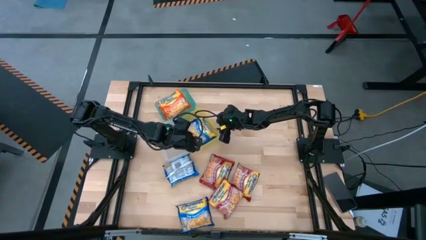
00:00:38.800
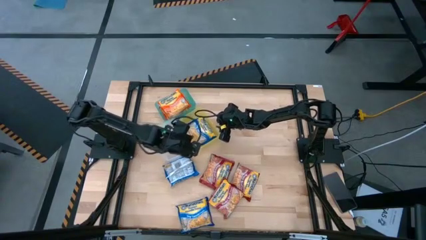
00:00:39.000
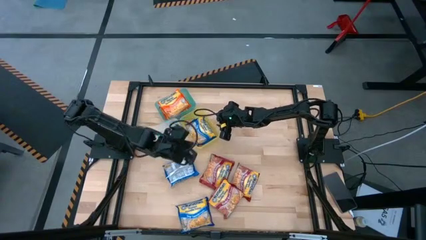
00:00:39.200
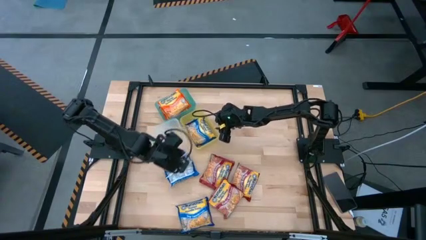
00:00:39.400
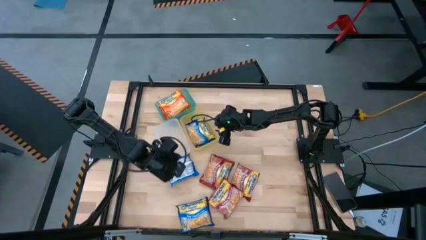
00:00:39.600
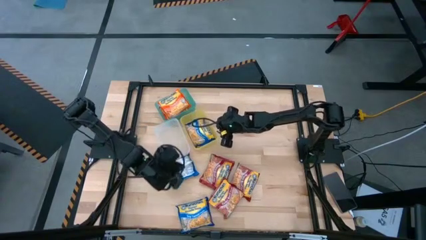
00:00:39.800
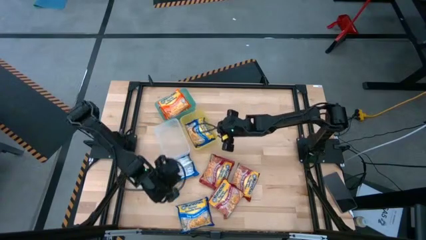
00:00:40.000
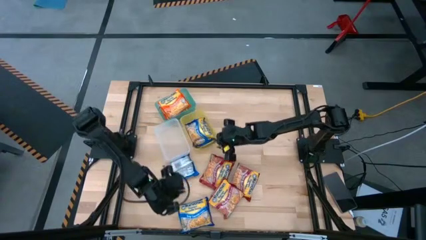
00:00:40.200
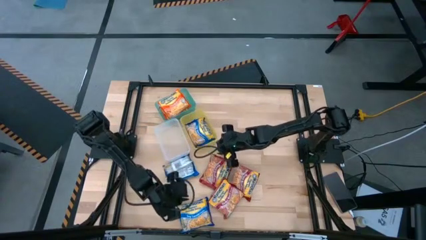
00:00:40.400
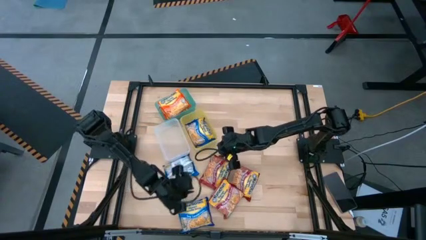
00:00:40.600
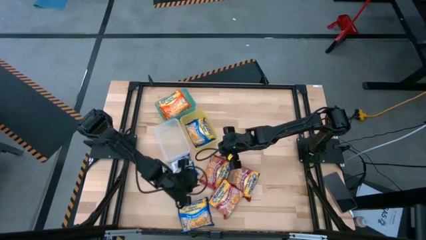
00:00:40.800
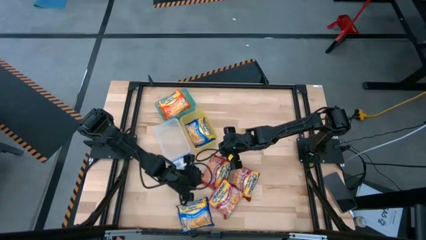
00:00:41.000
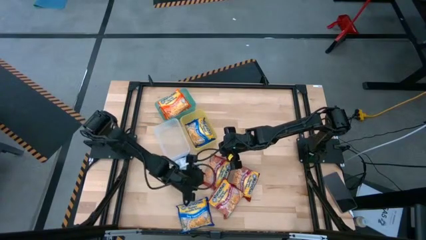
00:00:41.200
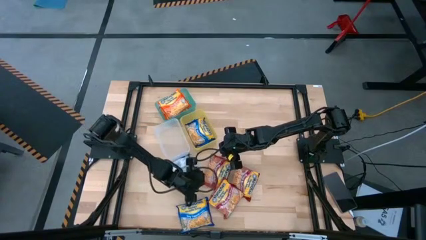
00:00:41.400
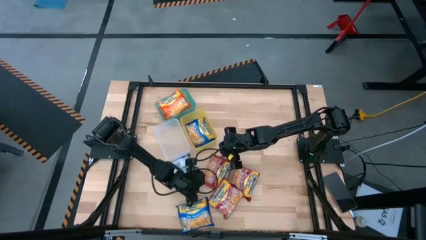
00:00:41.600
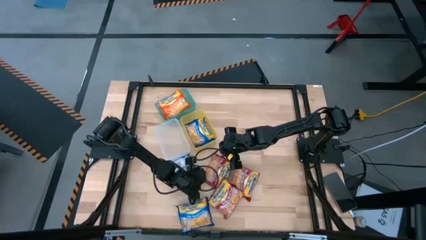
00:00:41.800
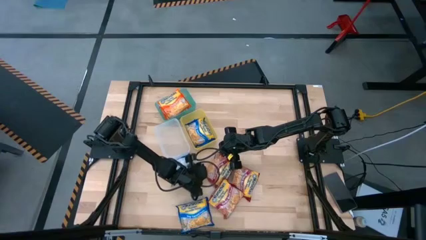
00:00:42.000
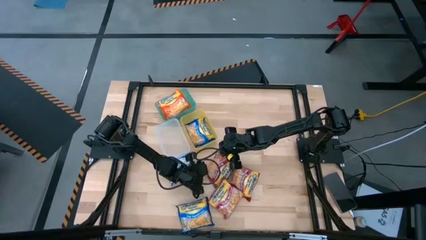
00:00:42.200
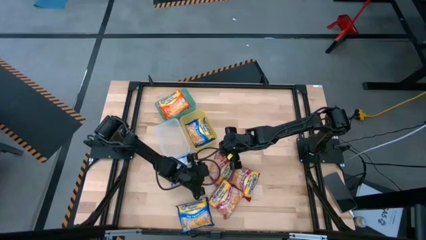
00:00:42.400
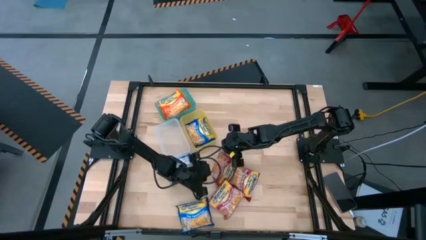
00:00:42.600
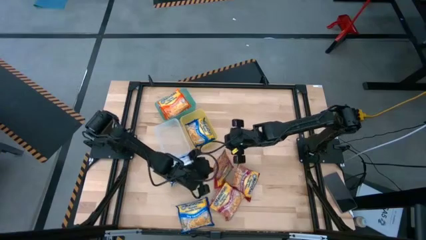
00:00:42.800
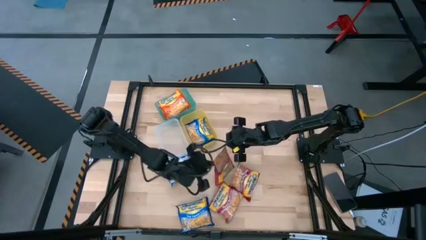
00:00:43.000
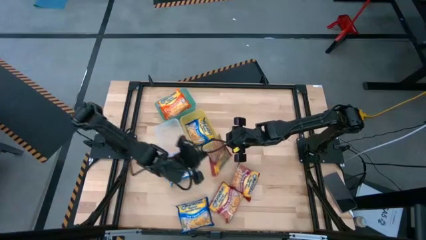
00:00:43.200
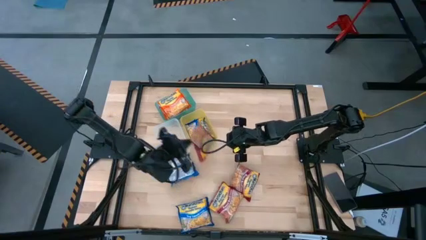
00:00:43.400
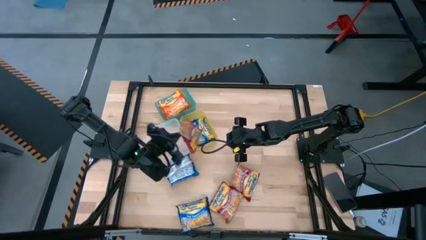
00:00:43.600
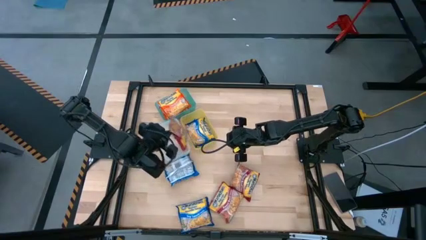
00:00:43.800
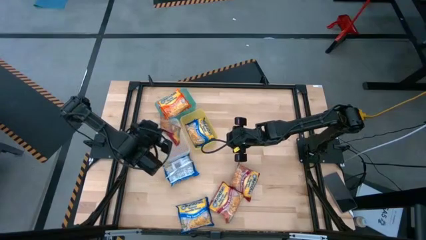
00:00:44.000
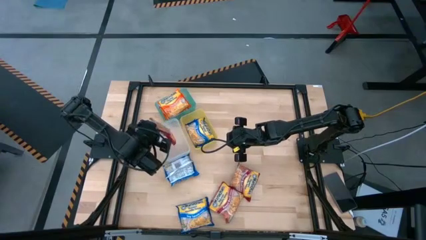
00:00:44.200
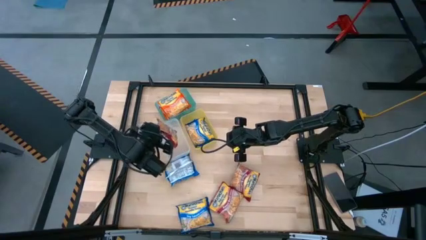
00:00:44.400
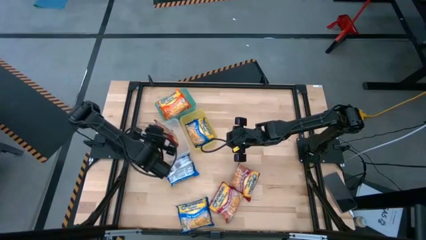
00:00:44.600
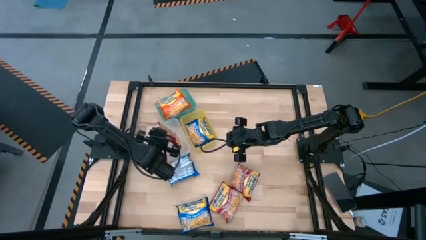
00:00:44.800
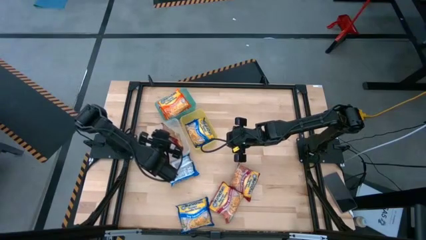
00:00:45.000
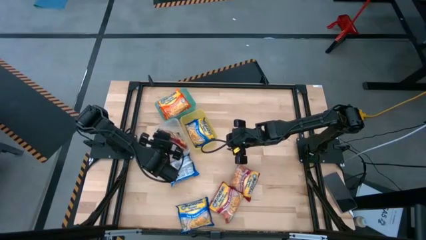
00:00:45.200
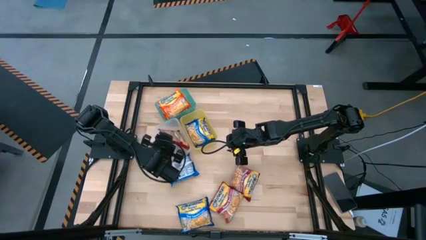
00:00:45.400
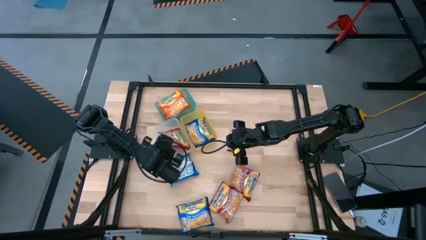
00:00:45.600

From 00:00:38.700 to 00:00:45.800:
Task: Sort Maruchan noodles
Put the bottom red noodle pack into the transparent bin

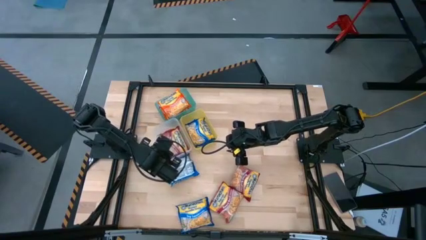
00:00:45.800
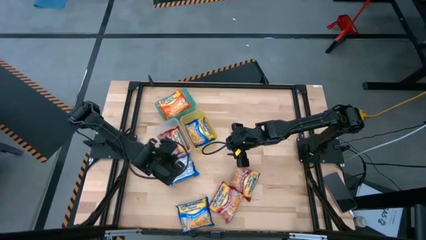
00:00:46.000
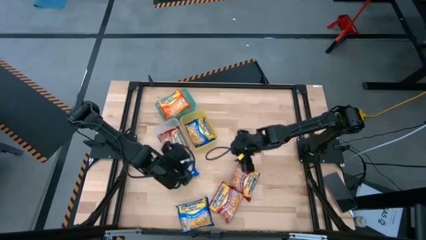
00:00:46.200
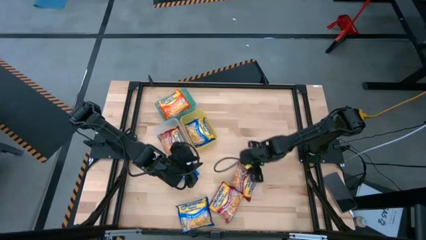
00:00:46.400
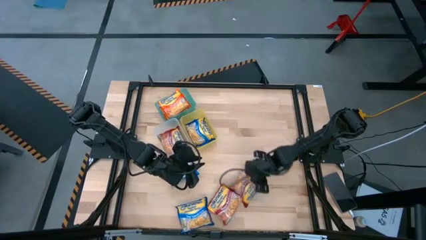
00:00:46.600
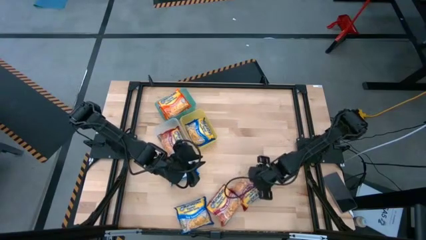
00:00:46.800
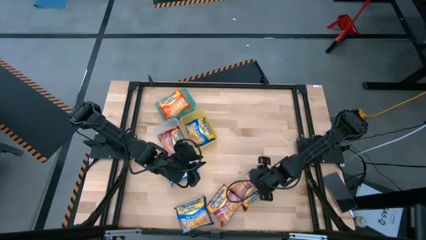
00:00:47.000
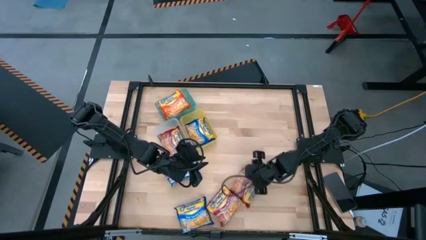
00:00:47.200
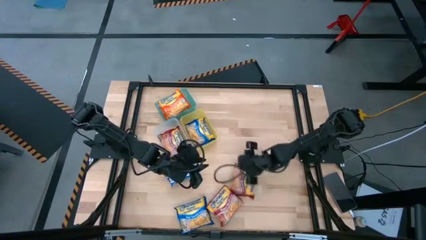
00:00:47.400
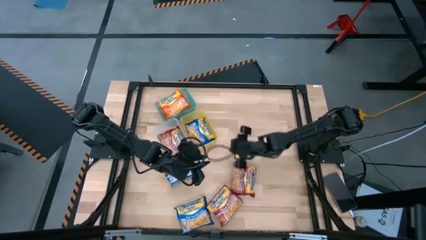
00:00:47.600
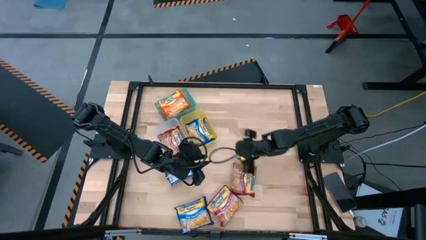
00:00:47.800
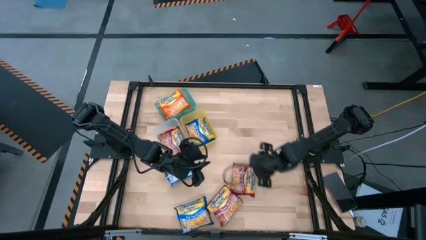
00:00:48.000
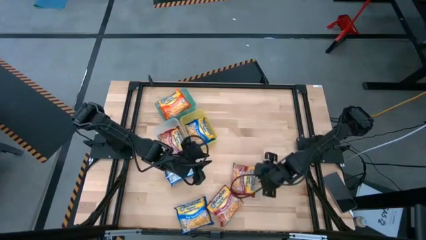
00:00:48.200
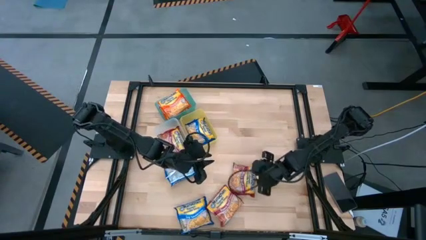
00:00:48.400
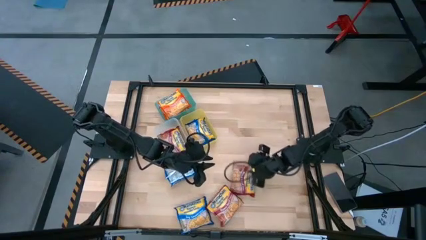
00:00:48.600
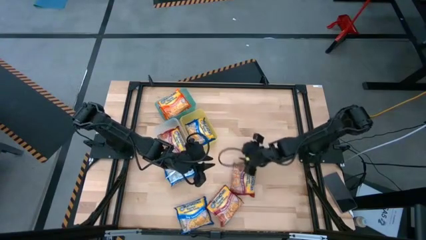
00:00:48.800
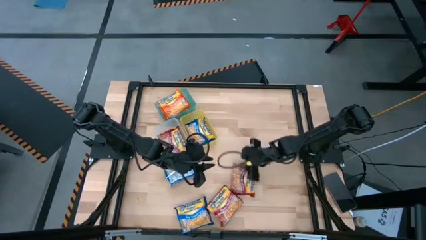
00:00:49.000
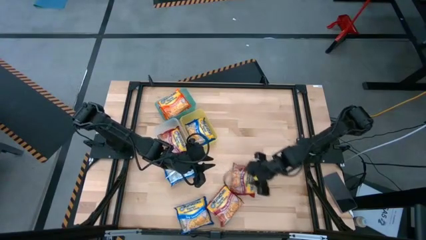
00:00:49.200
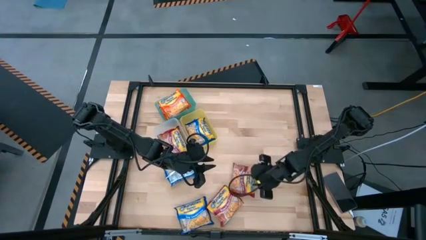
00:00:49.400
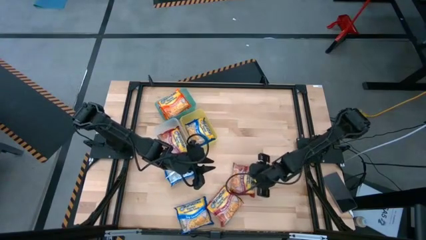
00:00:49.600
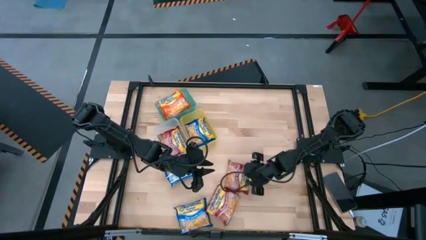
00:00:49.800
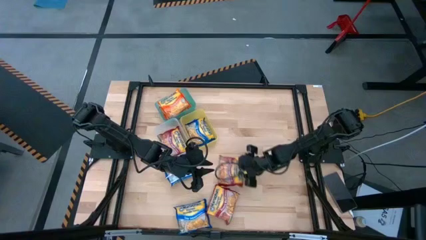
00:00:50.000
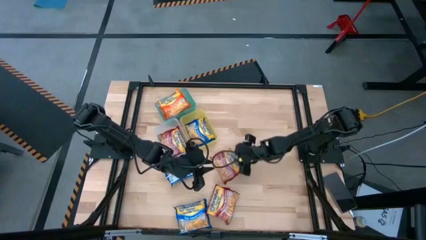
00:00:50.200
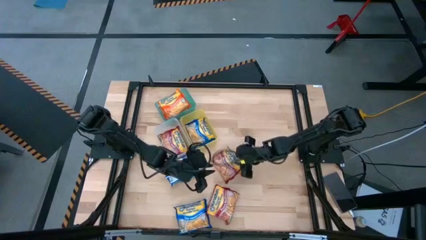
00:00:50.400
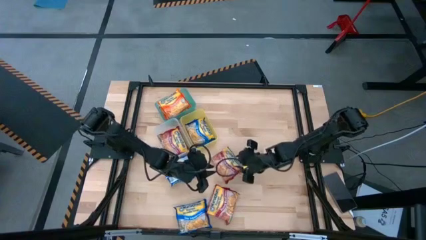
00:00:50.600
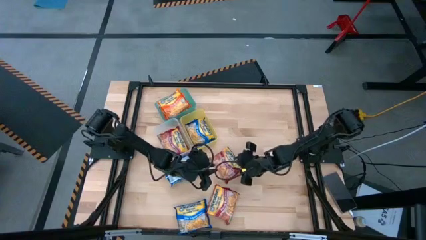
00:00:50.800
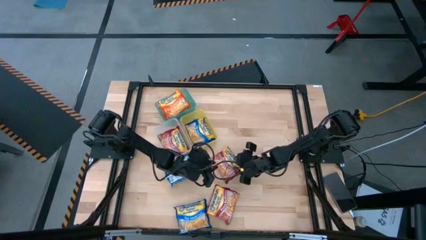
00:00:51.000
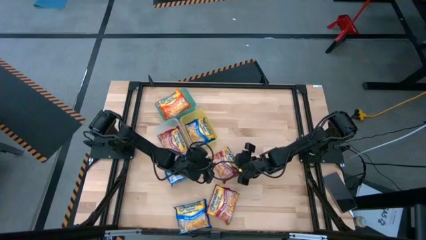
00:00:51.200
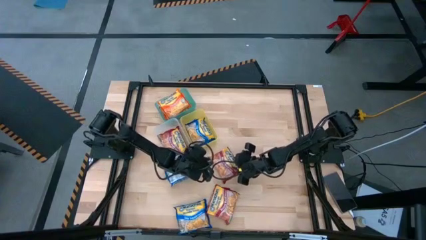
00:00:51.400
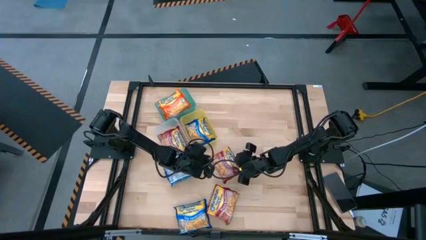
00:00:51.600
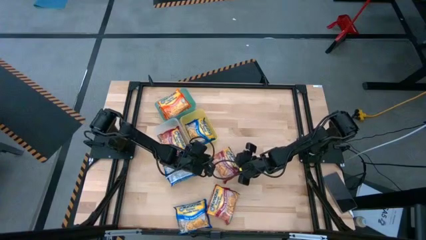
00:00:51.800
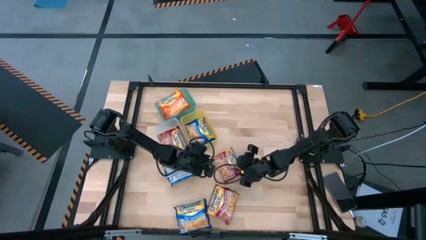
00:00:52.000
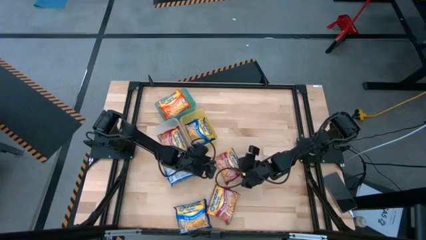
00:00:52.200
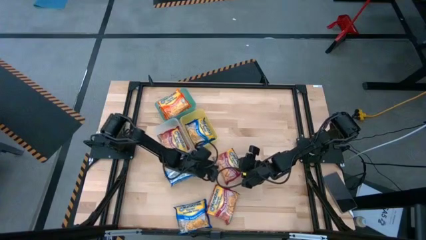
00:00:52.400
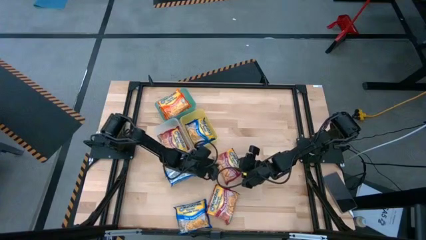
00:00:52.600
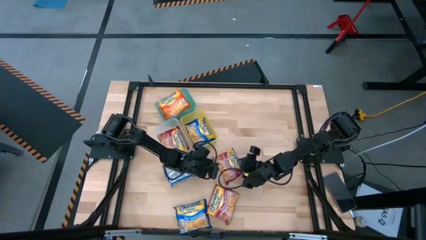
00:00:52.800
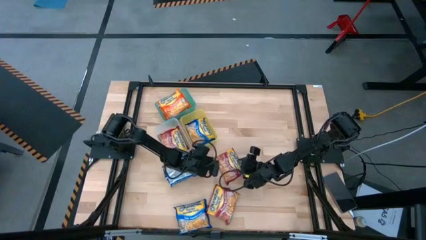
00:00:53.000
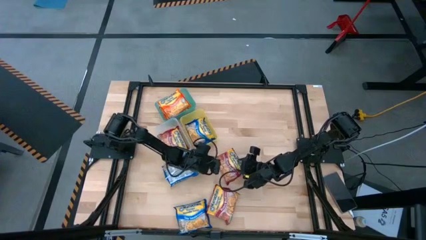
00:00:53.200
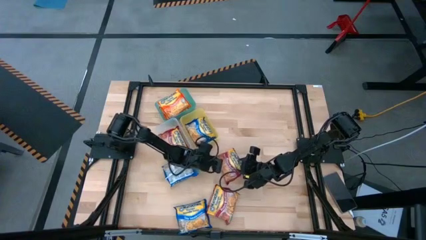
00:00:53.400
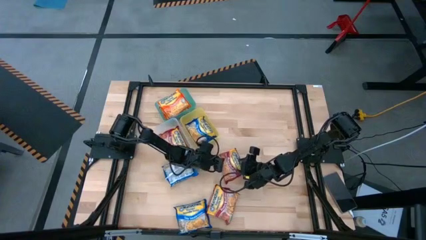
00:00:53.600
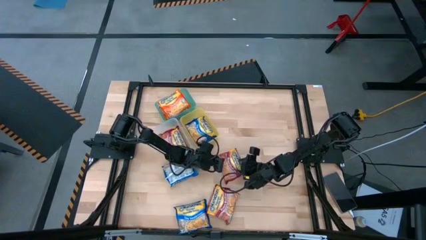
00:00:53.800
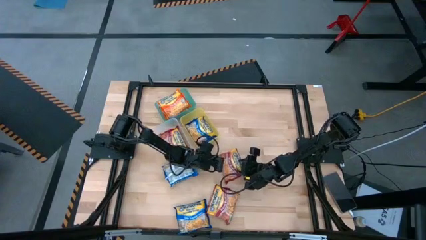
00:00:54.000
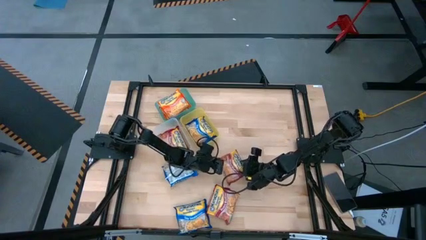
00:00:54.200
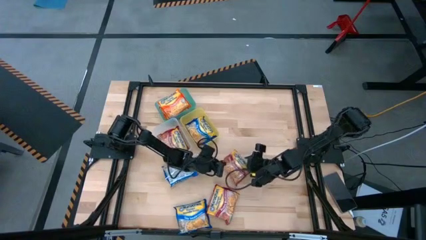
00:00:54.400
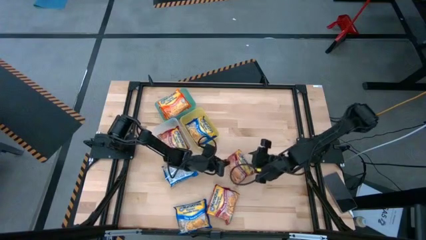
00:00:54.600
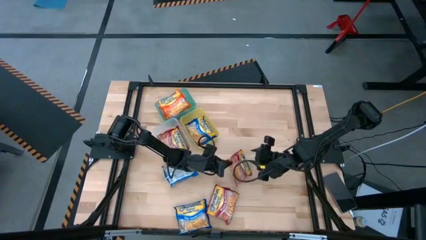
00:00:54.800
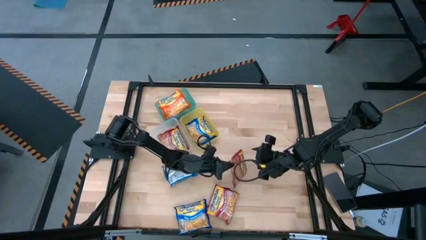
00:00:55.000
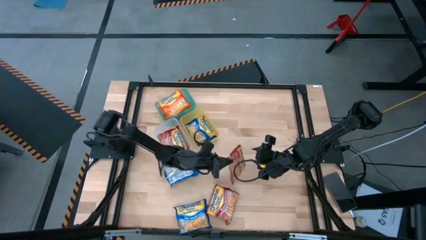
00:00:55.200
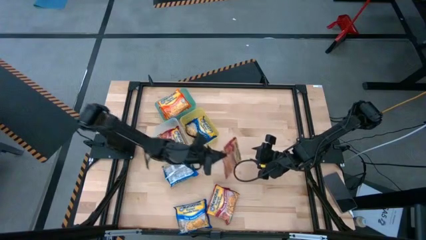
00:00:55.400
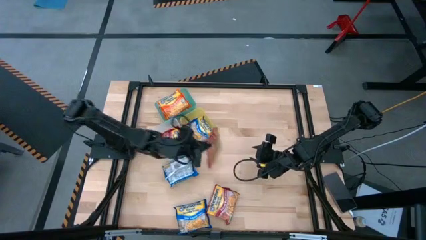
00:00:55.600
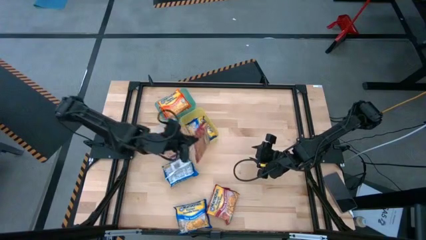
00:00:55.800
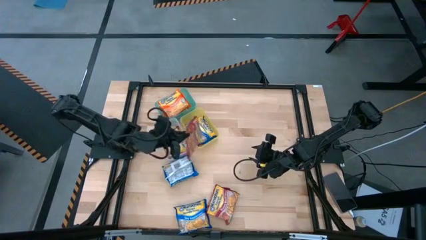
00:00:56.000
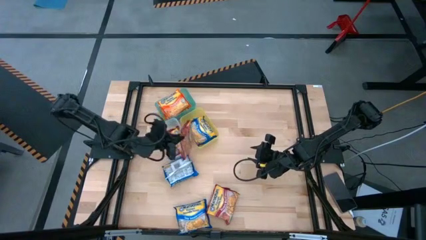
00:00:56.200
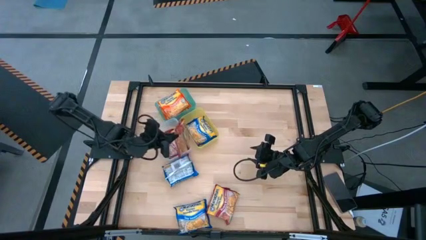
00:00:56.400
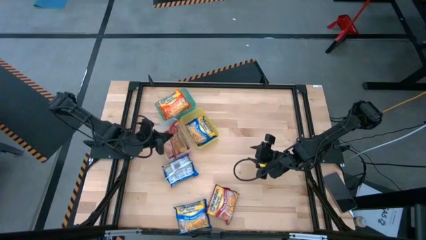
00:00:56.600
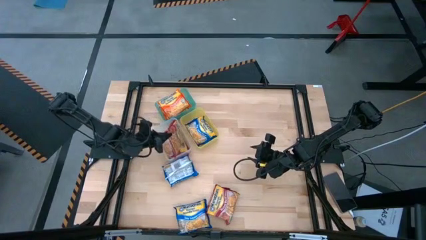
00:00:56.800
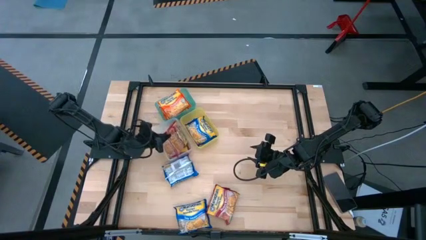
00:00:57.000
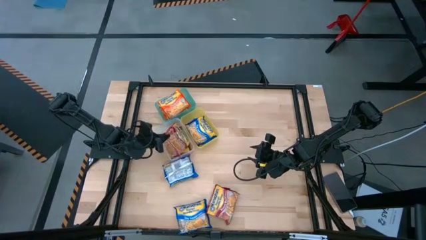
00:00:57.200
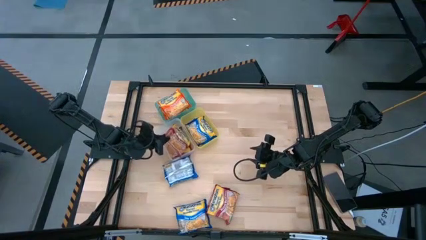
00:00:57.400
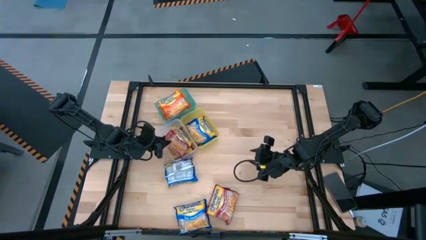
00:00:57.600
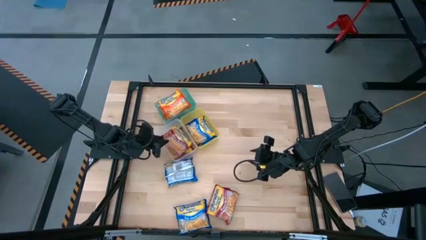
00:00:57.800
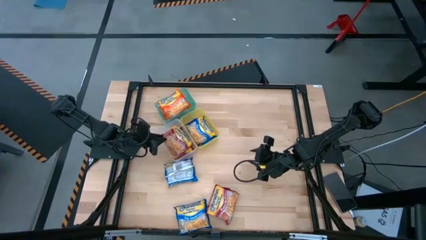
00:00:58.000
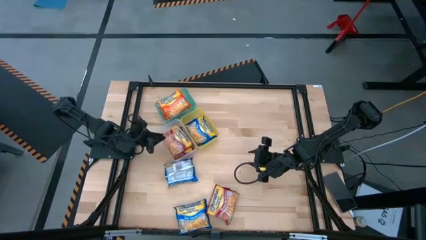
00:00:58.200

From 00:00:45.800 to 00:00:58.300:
Put the right red noodle pack into the transparent bin
